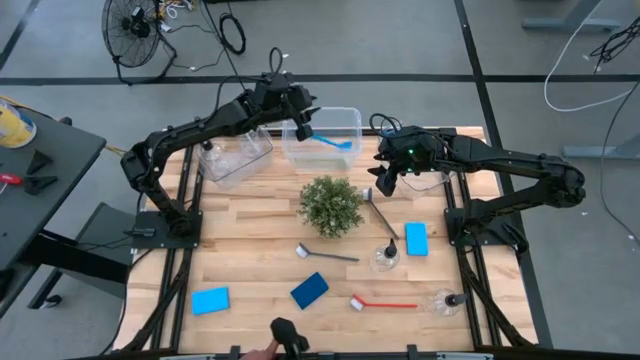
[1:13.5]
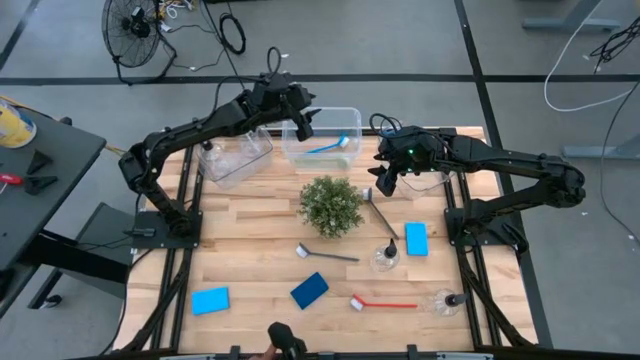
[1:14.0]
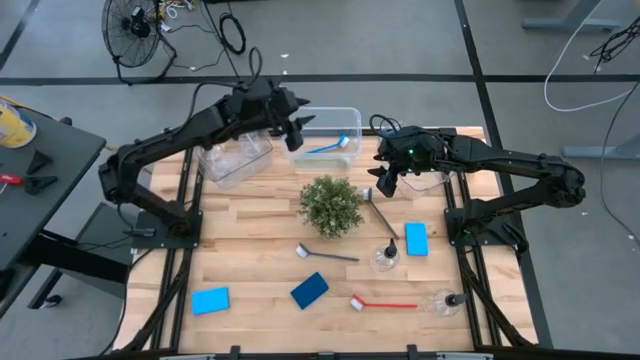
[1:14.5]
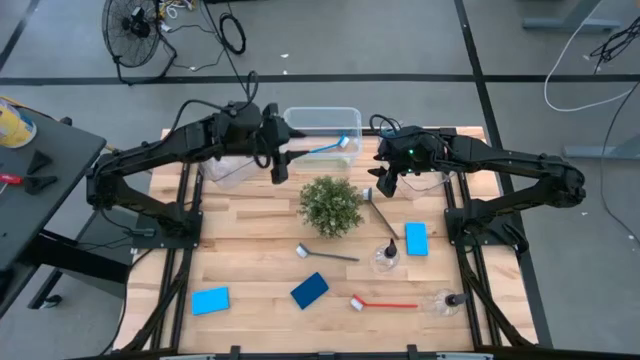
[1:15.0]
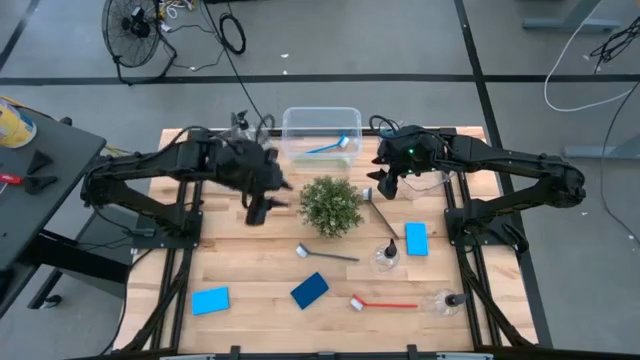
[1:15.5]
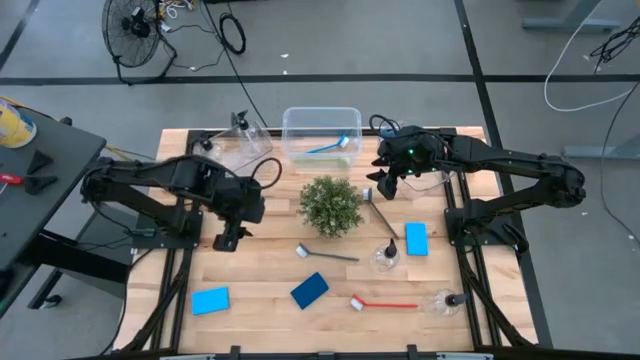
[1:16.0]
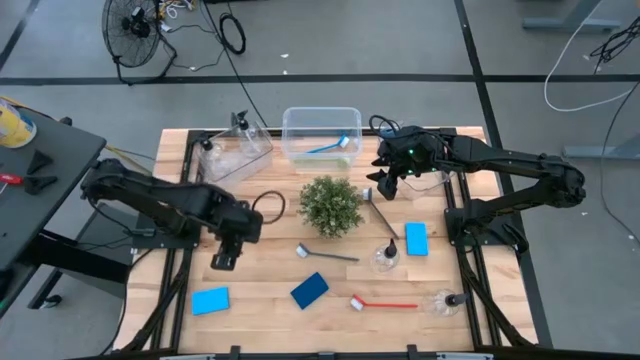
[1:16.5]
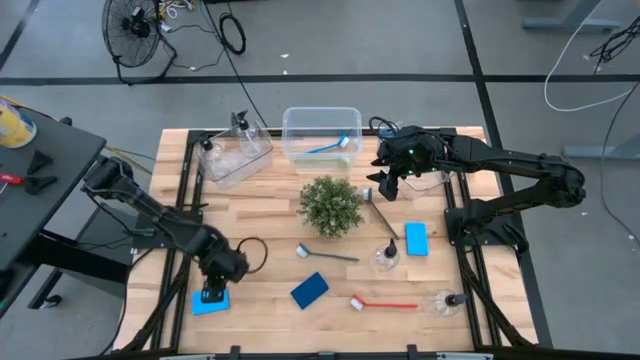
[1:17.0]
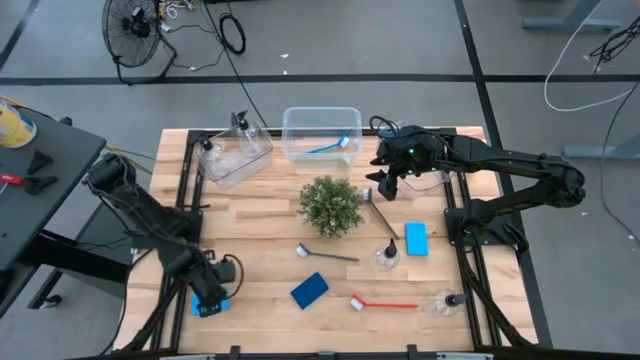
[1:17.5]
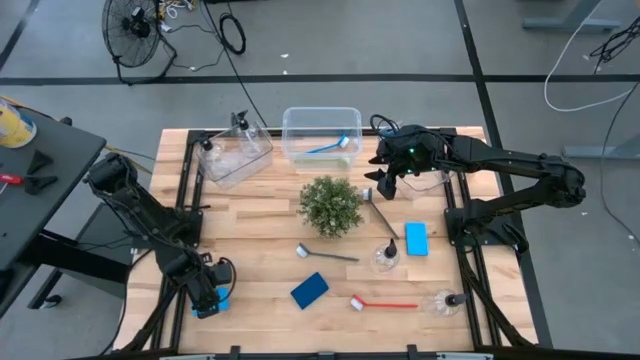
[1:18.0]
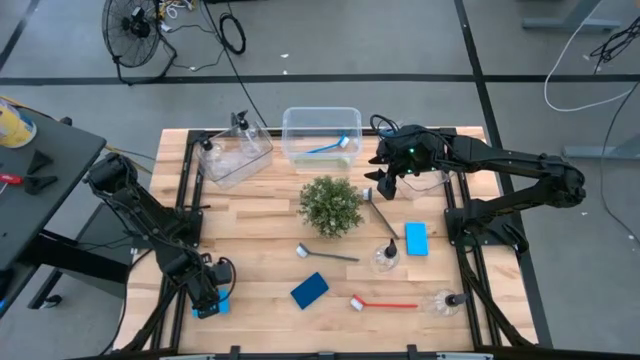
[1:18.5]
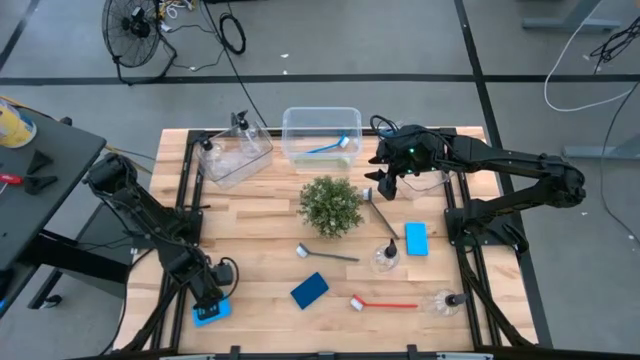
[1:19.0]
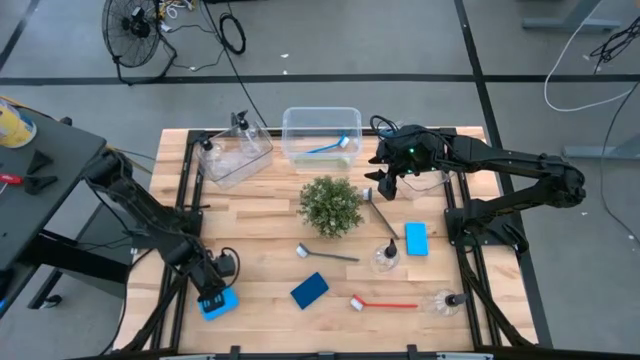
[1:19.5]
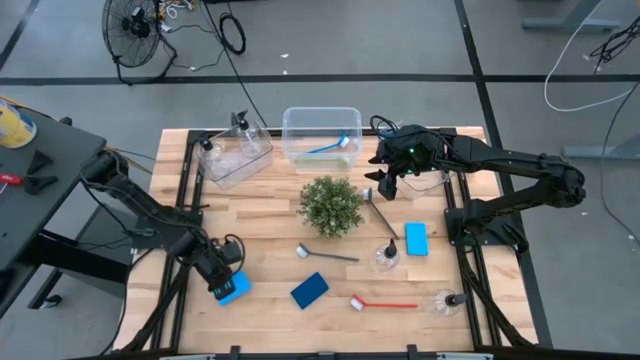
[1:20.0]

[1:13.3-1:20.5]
Task: Pick & Place Kitchen Sink Supplies
Put the blue sponge into the right transparent bin

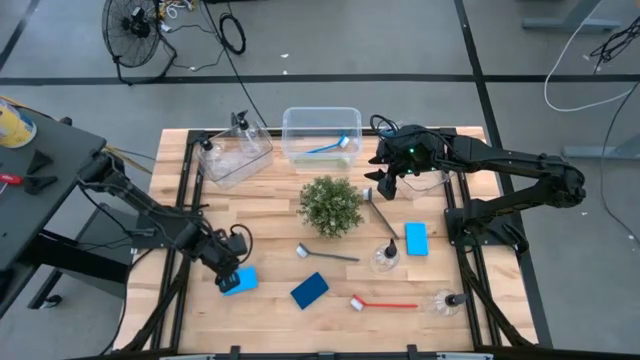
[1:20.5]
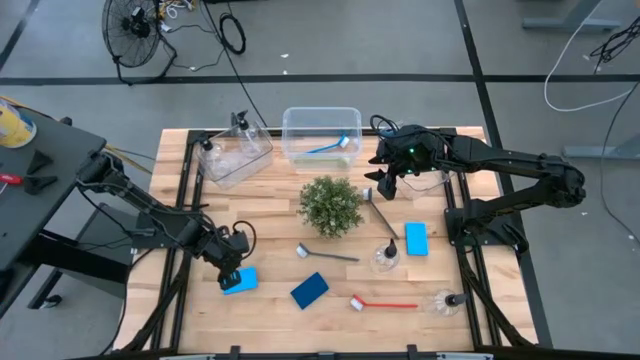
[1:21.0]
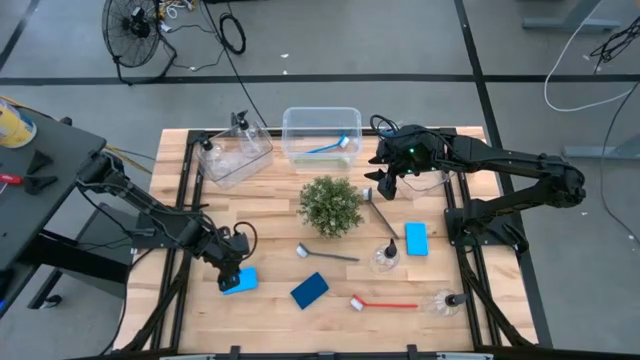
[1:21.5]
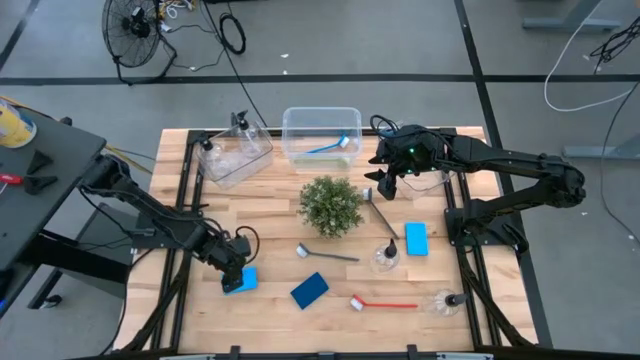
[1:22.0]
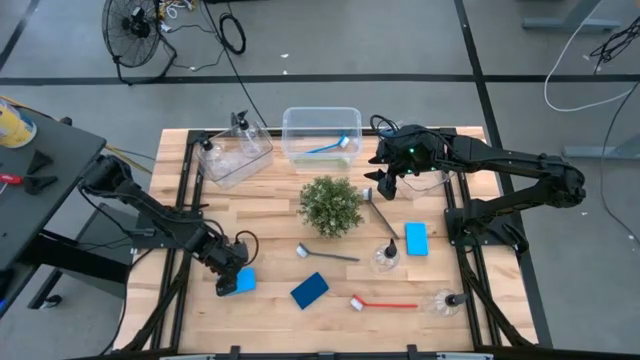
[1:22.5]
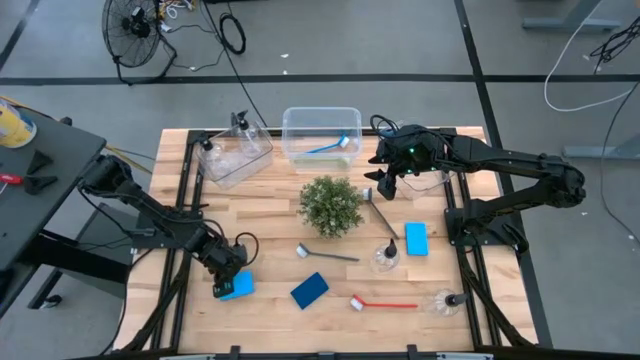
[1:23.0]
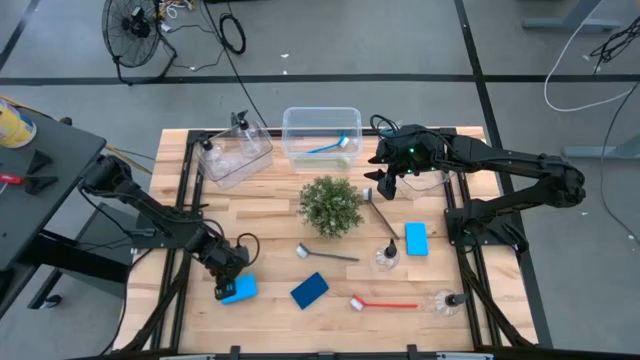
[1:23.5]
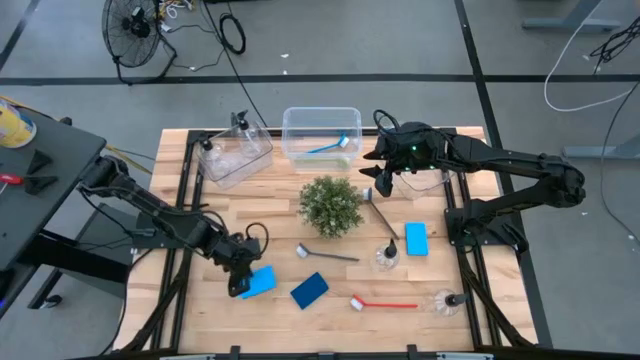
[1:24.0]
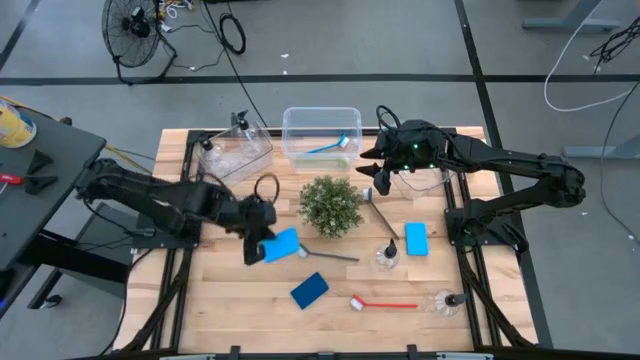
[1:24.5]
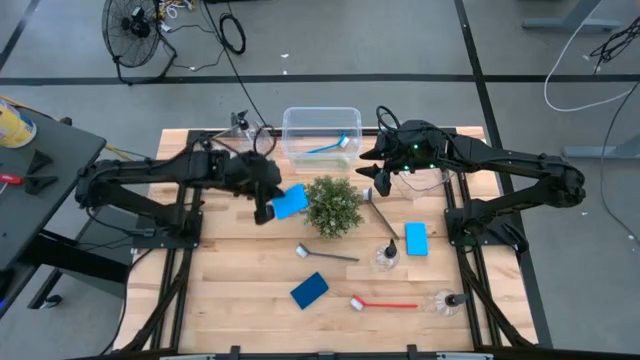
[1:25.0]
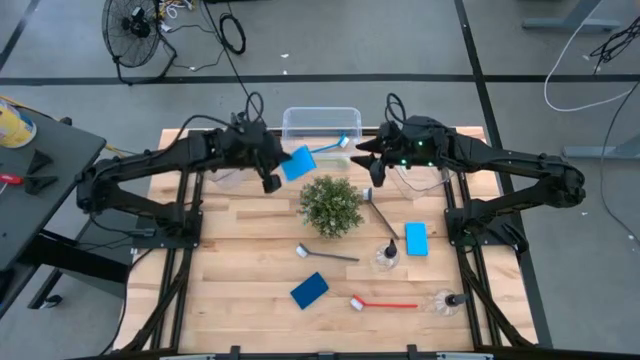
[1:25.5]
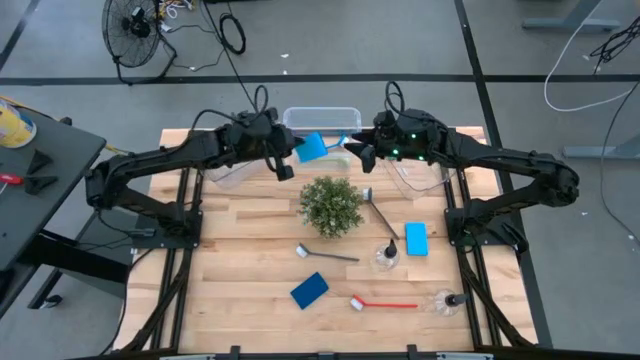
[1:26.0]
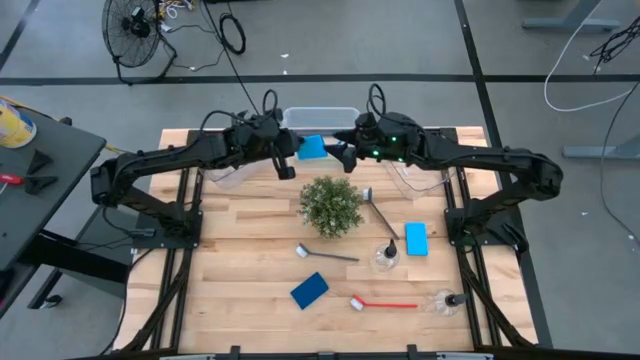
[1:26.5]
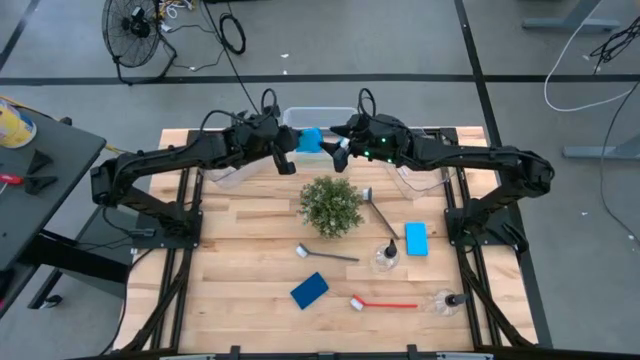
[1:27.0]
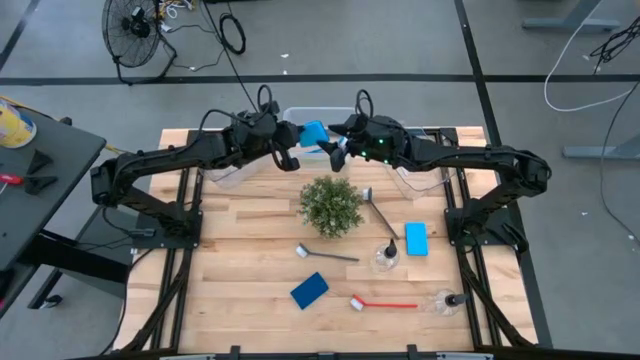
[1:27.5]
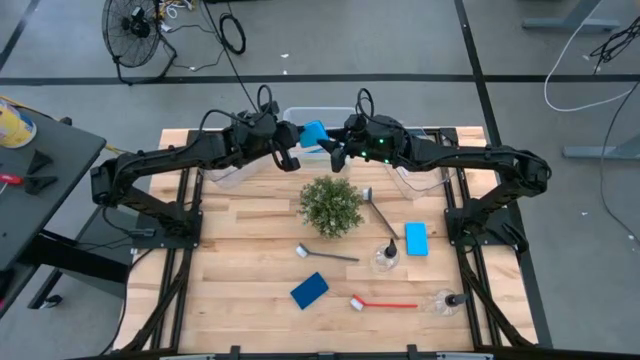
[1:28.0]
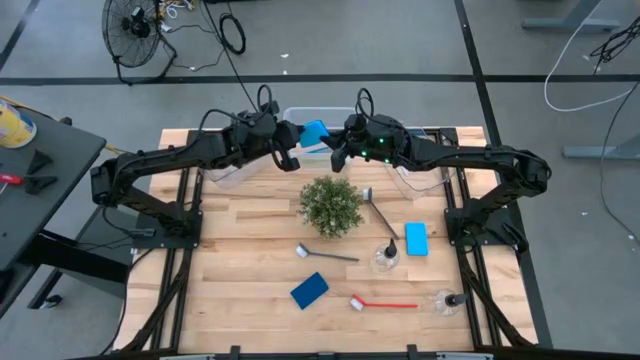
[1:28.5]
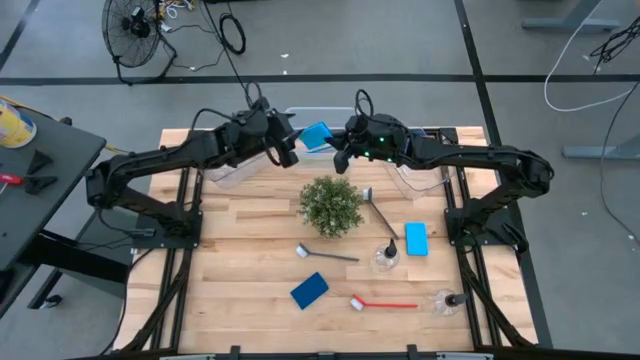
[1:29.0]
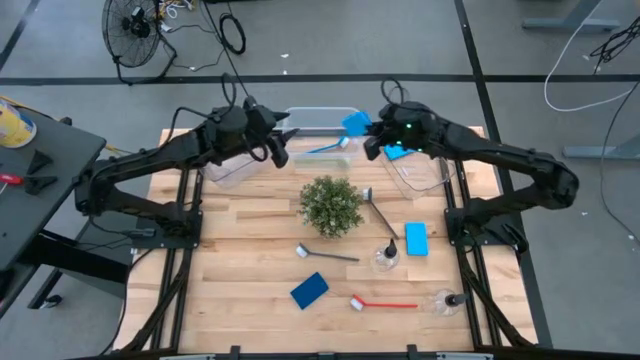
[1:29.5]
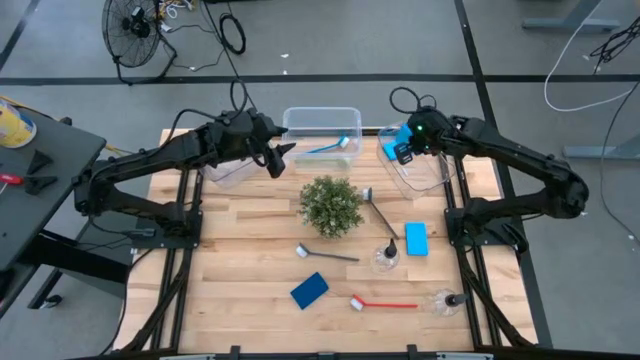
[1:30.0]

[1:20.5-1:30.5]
Put the blue sponge into the right transparent bin
